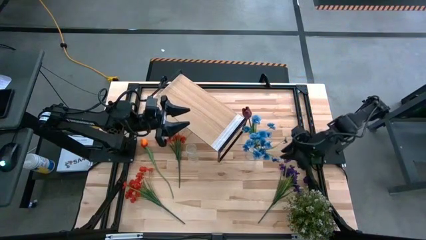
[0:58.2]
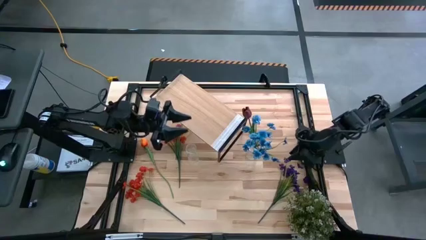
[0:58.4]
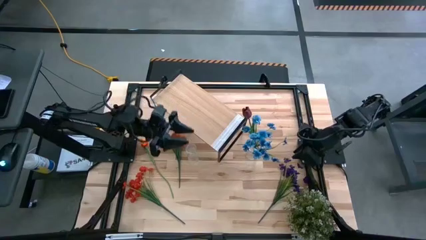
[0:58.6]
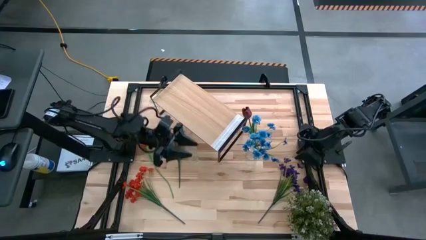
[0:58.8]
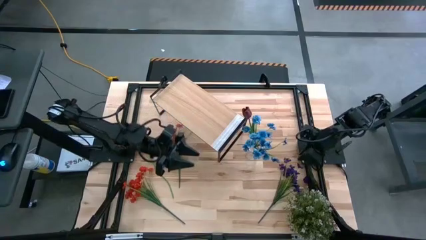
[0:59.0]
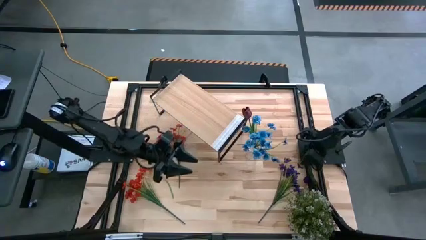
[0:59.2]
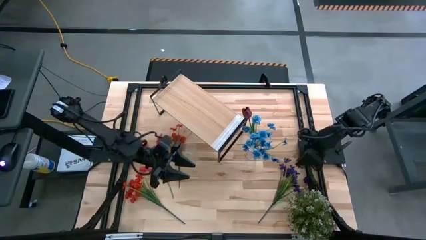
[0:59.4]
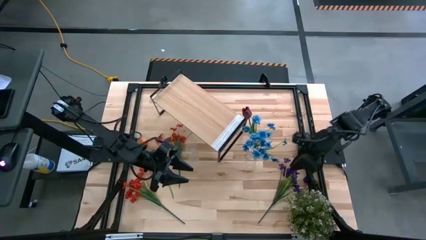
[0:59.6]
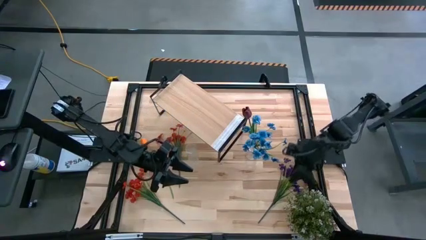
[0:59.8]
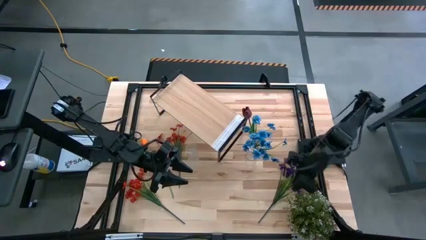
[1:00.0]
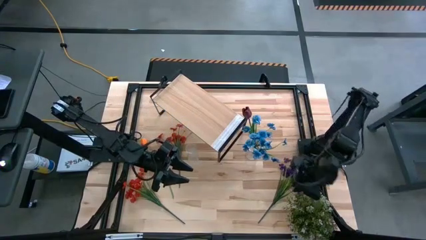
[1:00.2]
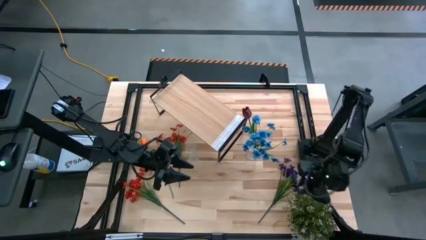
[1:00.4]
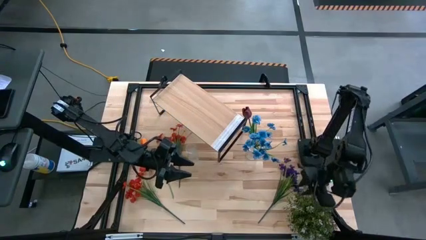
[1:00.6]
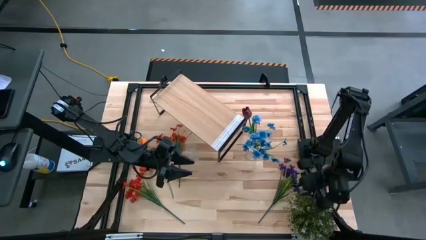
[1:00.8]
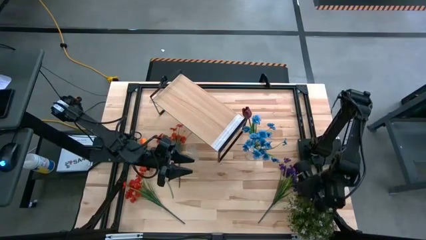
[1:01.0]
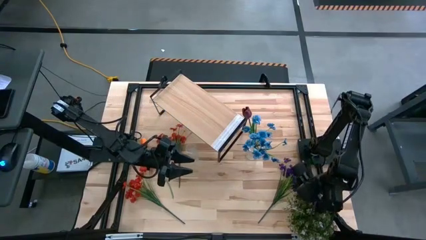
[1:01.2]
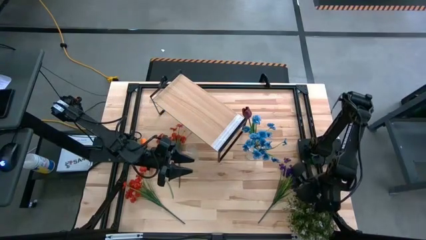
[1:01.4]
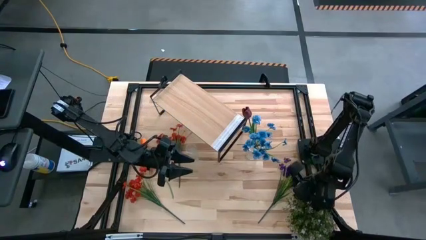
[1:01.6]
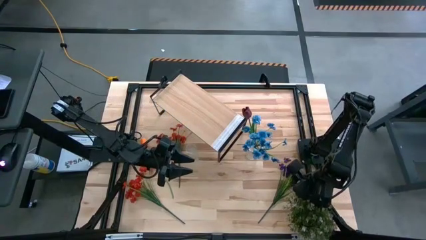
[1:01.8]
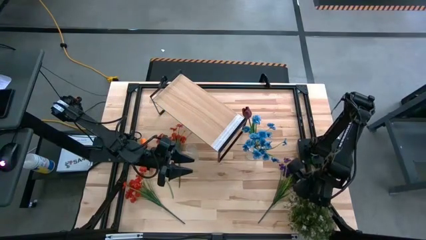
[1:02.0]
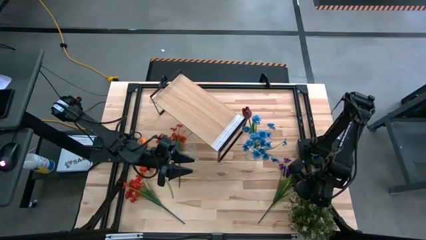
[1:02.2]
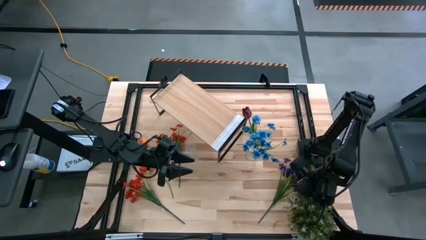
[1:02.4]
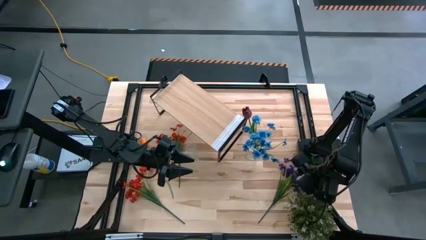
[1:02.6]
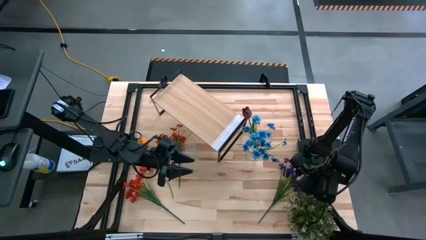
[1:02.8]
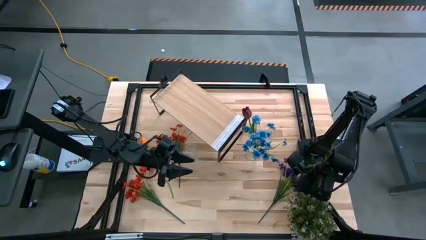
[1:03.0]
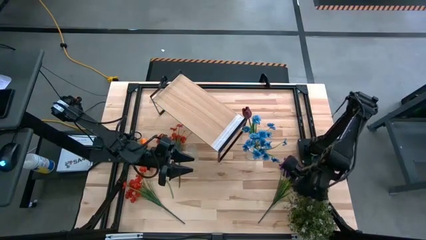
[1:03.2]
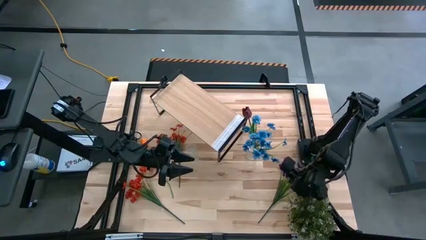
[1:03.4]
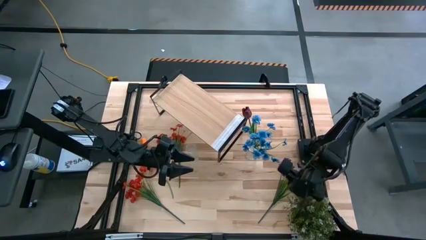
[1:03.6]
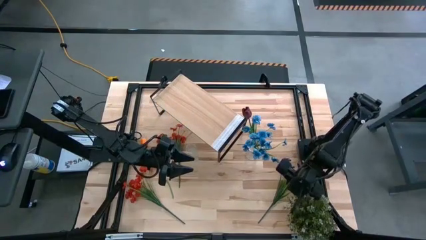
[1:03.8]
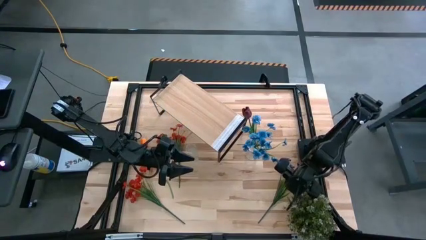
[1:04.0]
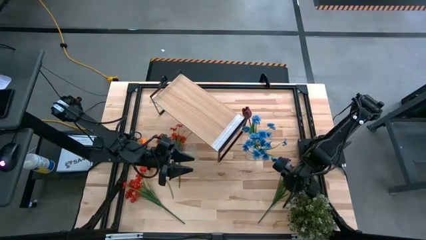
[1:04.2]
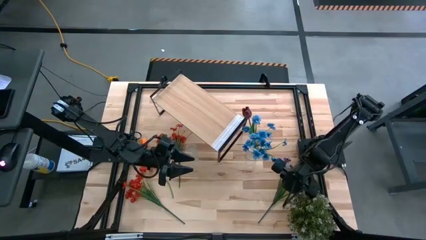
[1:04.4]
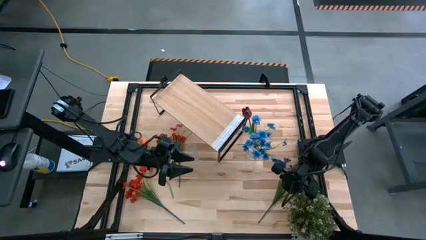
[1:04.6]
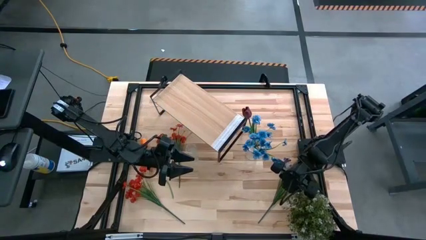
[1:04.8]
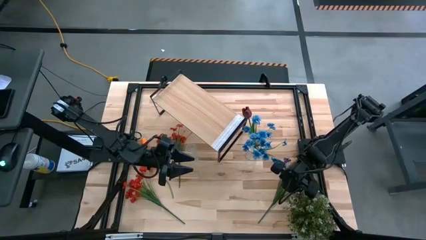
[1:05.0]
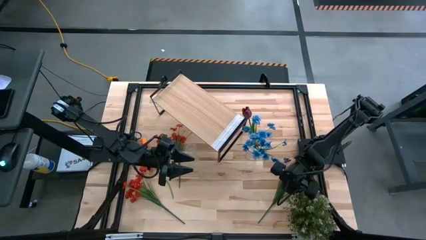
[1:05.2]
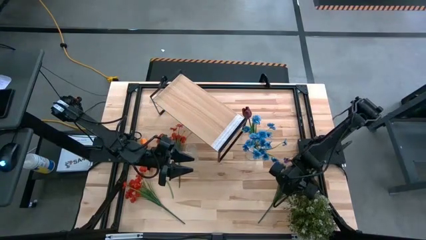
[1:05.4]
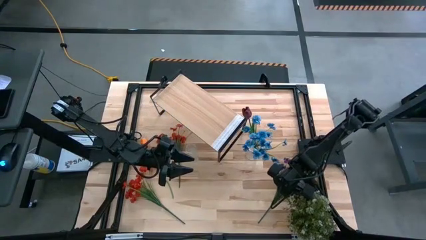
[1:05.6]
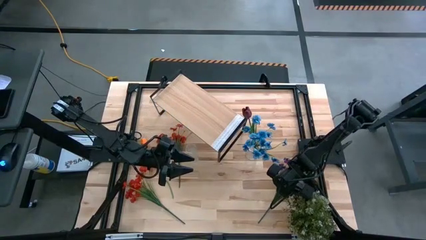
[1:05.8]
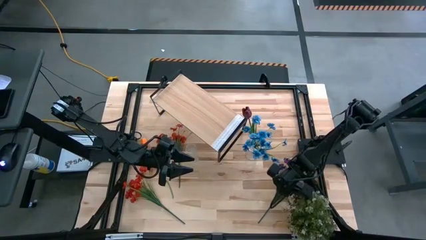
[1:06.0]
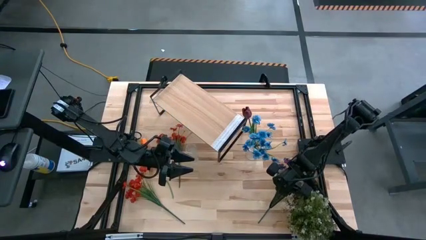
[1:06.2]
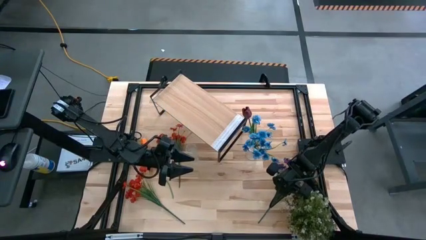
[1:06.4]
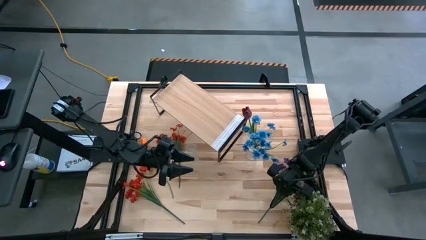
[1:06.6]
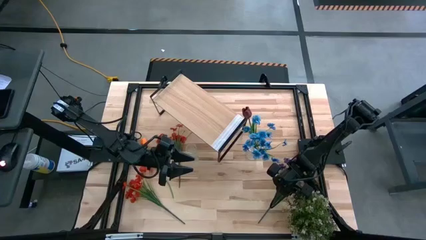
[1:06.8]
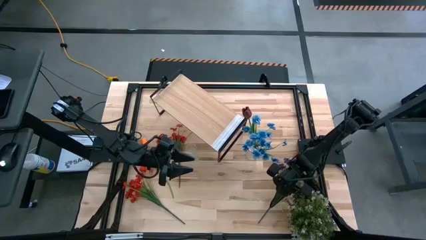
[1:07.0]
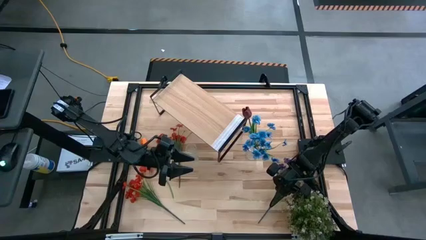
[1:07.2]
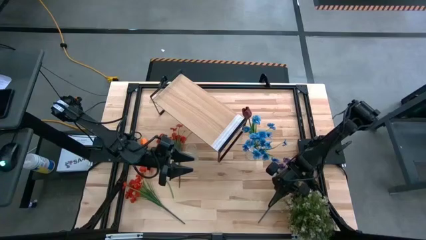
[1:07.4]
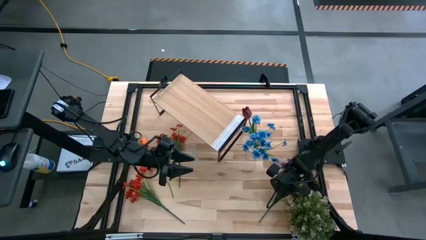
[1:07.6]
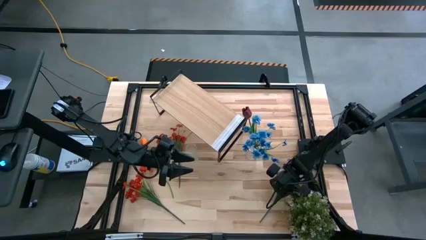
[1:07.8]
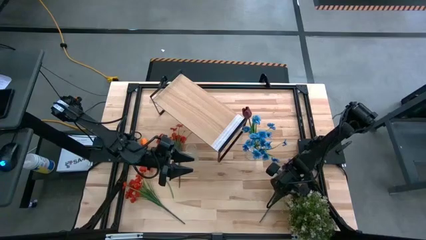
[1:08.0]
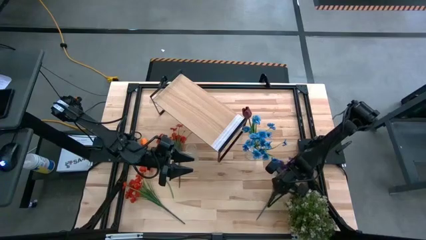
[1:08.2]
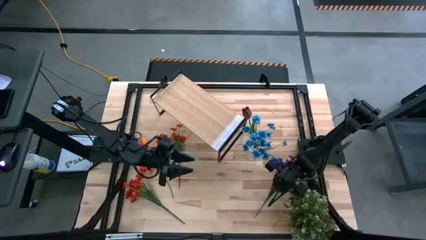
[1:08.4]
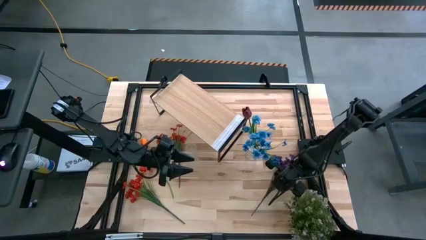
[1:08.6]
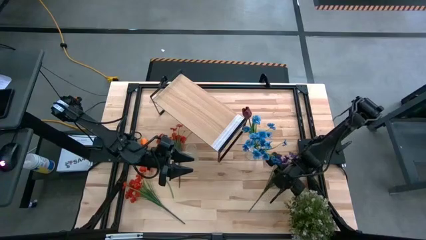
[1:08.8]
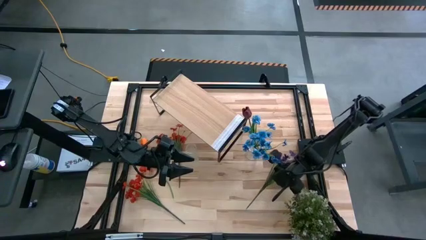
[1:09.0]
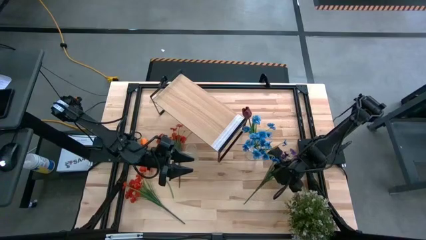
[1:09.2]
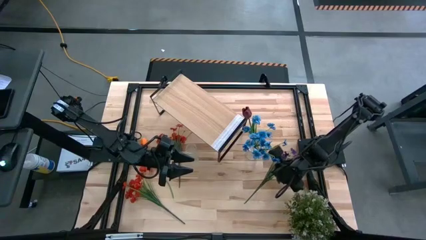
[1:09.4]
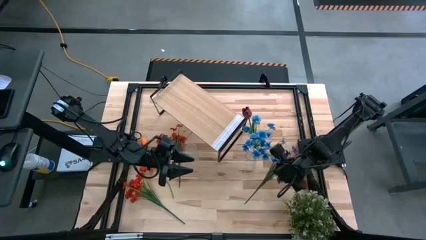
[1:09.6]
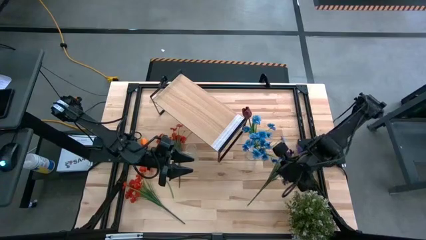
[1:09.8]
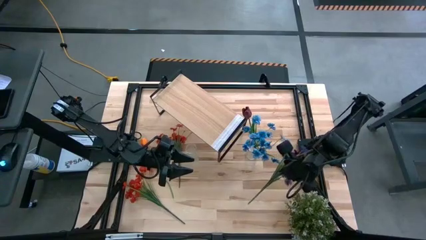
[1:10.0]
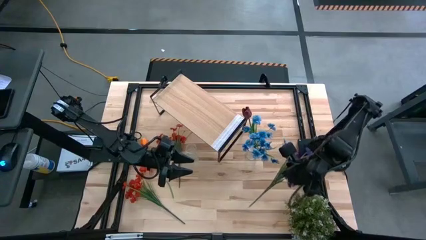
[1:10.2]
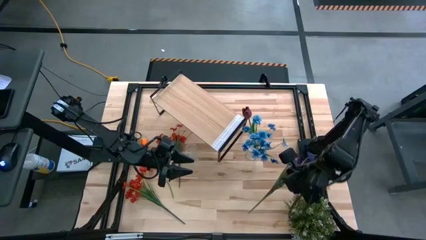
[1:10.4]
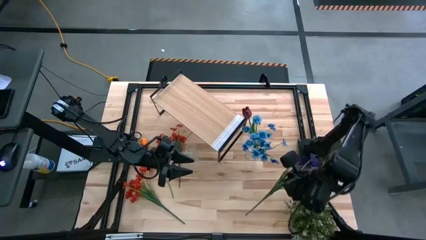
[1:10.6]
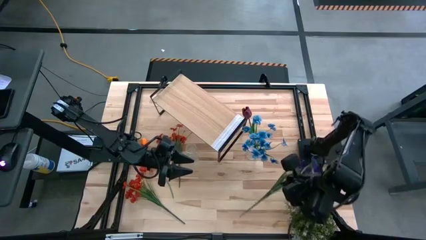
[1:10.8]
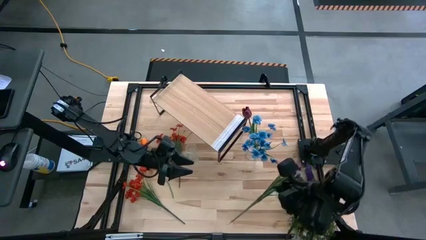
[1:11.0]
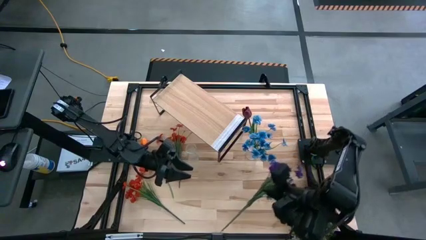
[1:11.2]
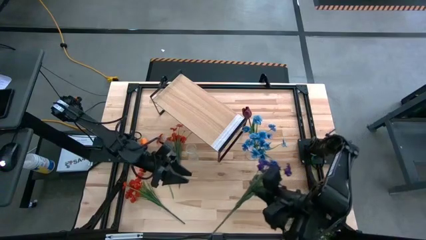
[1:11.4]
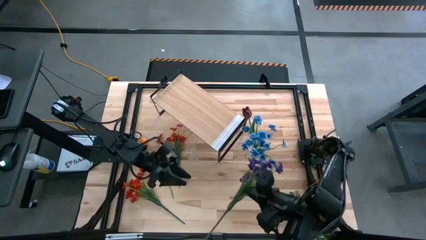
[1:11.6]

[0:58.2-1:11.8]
Task: Pick and place flowers into a vace then onto a shelf
Put the violet flowers into the right transparent flower vase

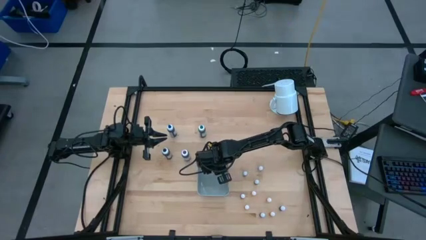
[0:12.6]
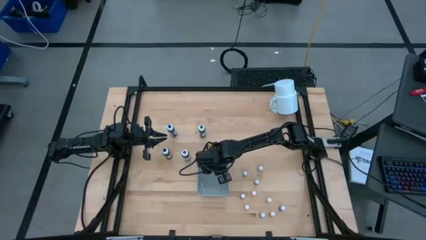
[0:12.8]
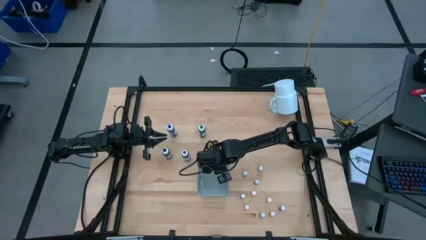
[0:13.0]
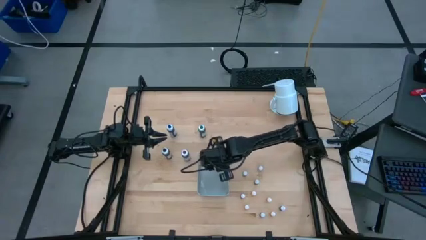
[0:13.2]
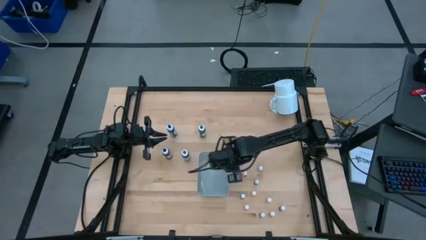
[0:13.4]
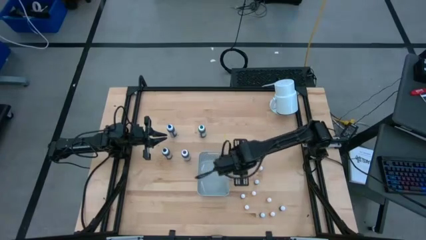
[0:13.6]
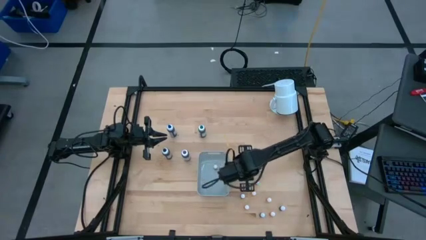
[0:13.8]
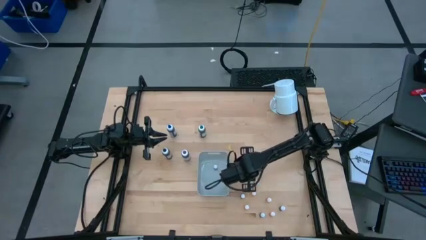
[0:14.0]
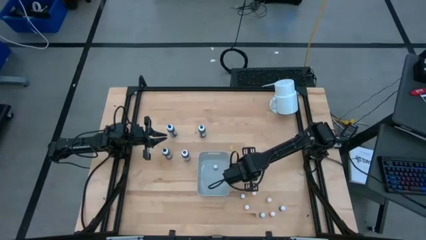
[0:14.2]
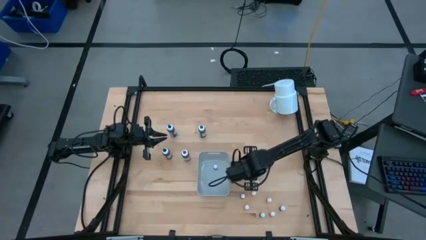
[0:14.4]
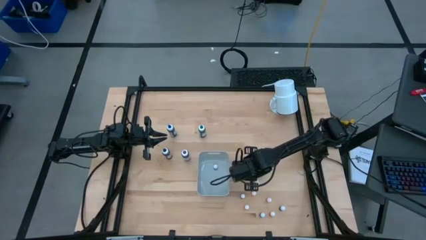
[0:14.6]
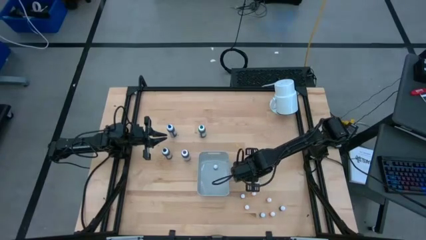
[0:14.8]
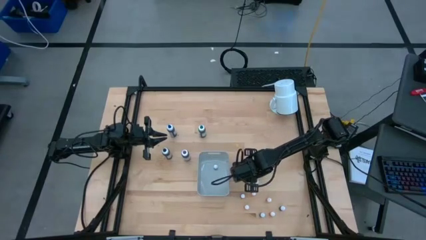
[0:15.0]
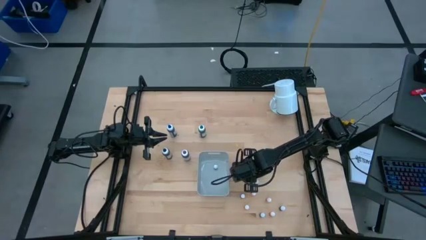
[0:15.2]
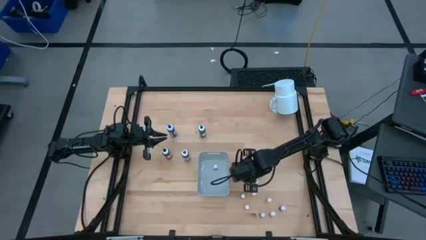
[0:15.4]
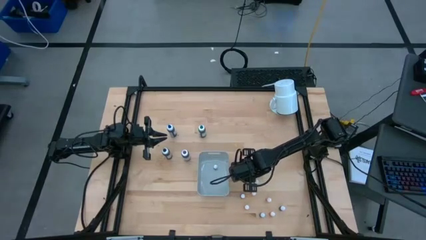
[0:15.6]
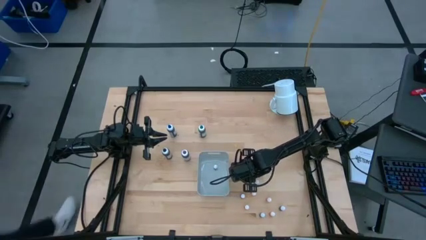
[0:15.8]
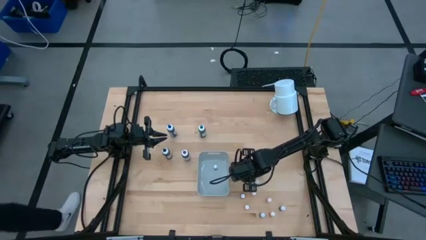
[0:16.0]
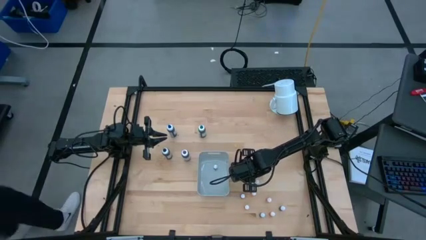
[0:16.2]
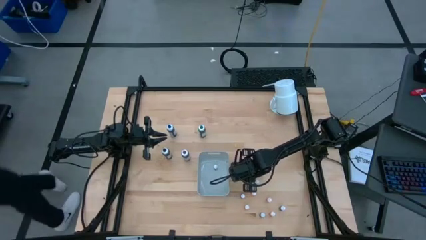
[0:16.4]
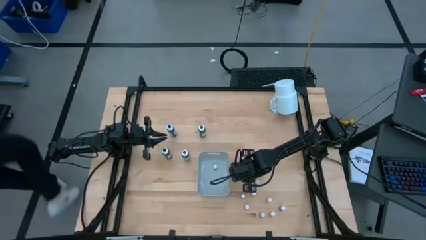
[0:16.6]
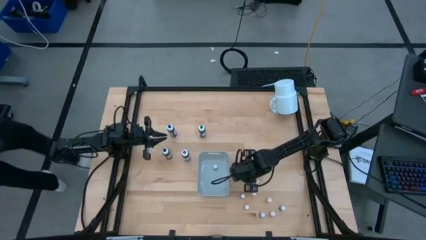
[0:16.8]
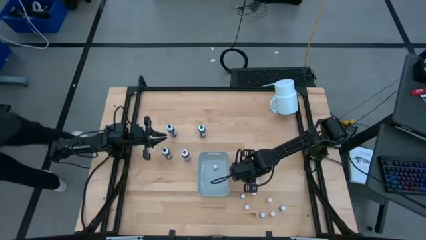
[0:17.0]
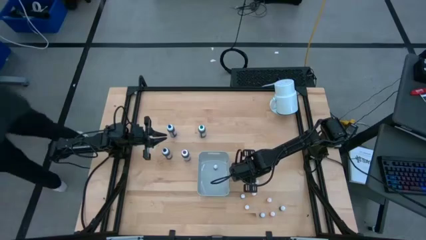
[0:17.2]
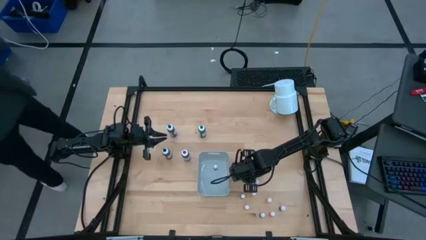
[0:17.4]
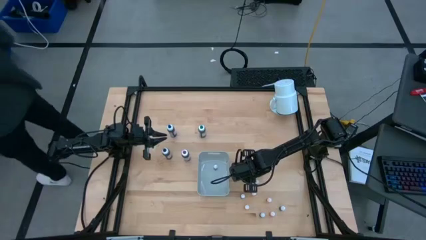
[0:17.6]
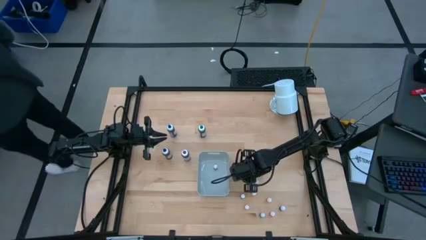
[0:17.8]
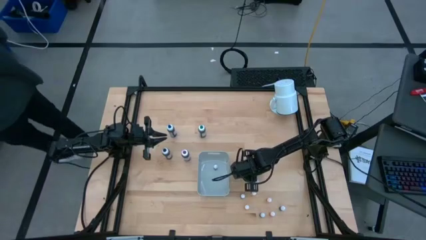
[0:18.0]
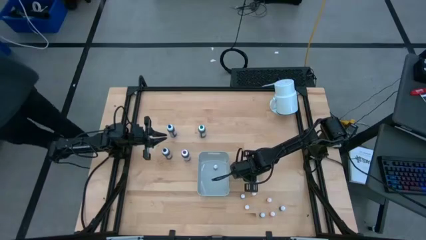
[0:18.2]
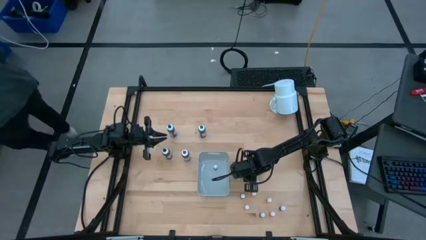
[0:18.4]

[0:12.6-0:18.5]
Task: Pick & Place food coloring
Put the small blue food coloring bottle into the white bin
